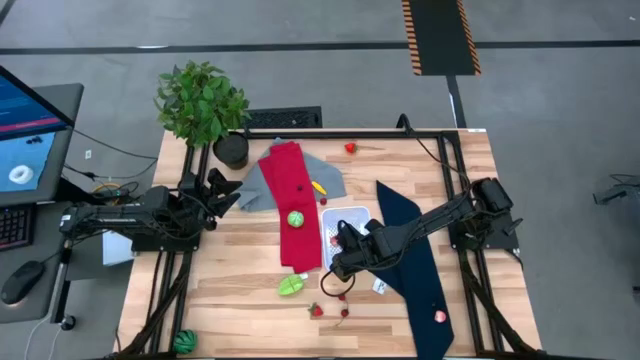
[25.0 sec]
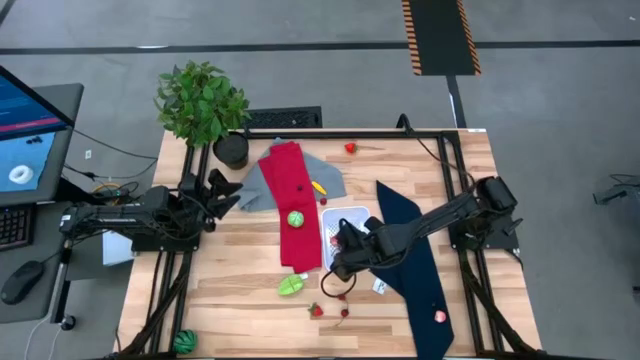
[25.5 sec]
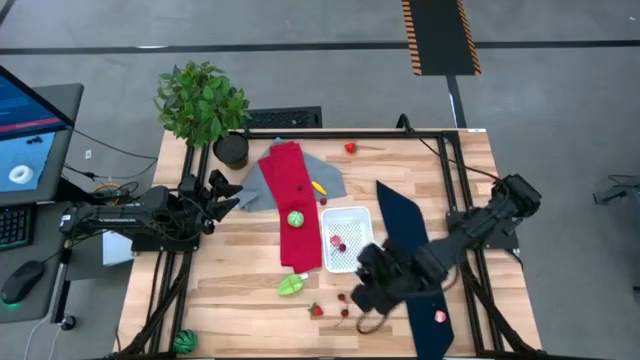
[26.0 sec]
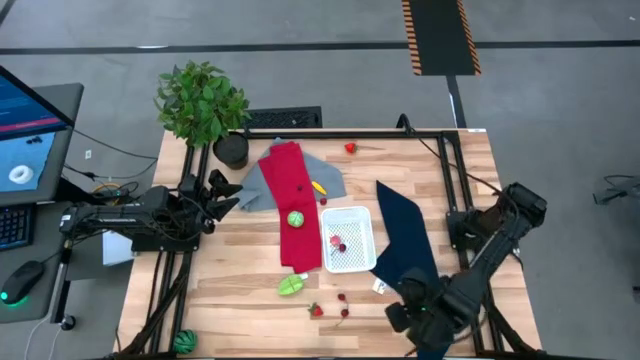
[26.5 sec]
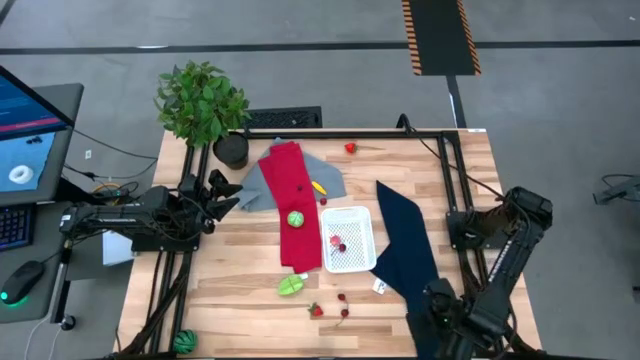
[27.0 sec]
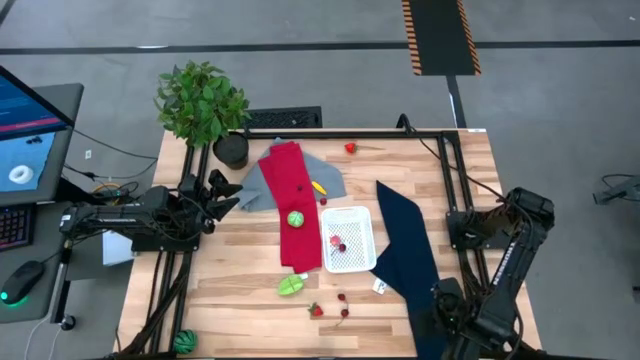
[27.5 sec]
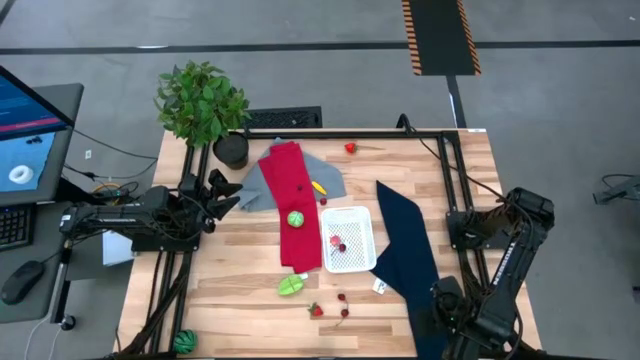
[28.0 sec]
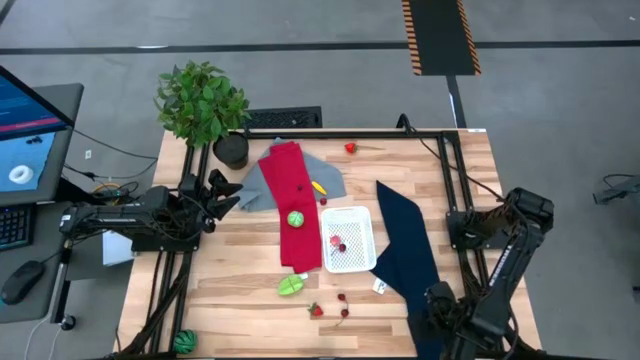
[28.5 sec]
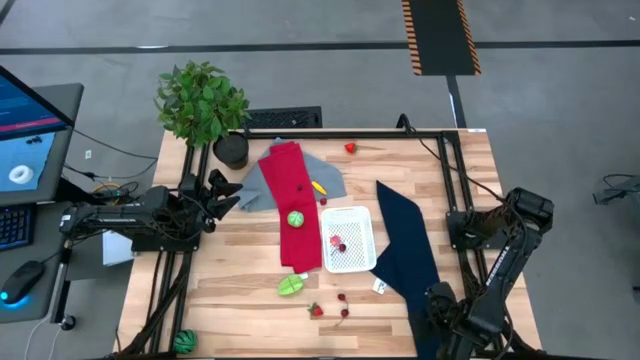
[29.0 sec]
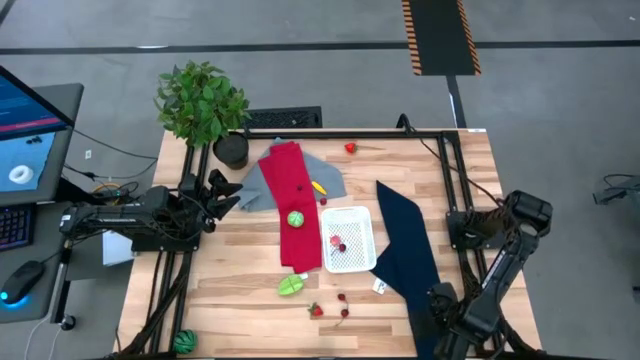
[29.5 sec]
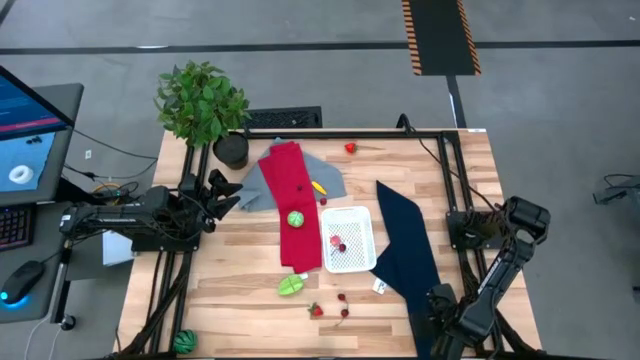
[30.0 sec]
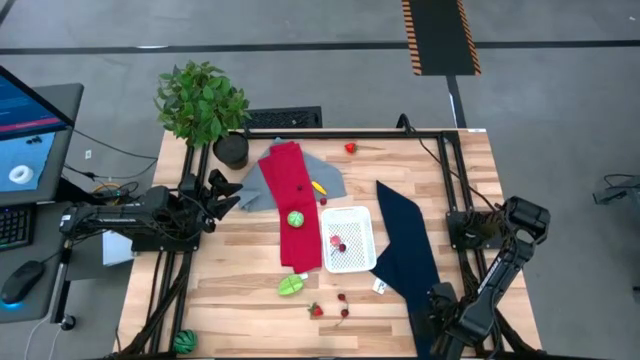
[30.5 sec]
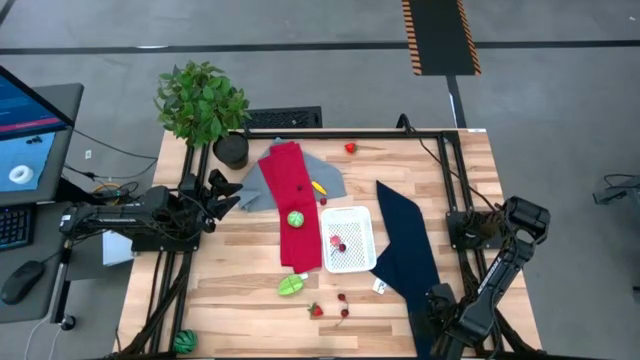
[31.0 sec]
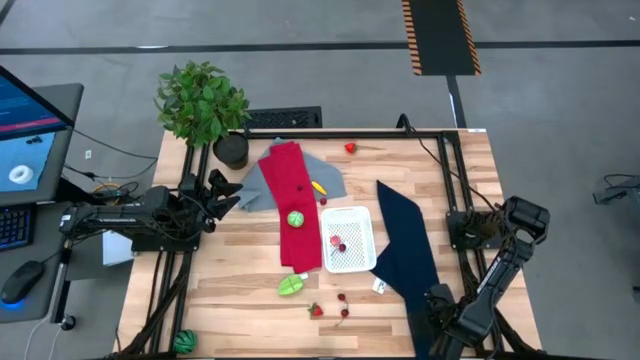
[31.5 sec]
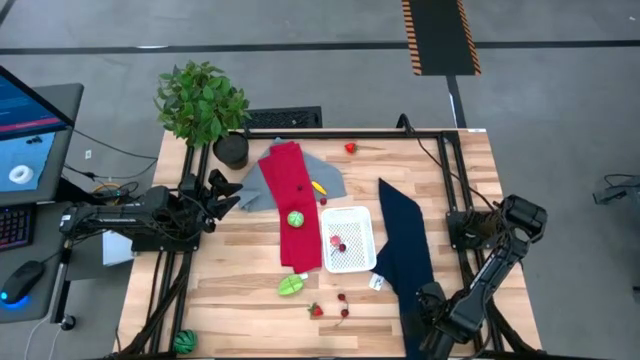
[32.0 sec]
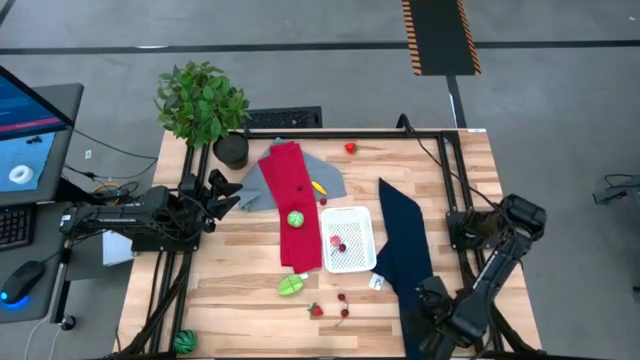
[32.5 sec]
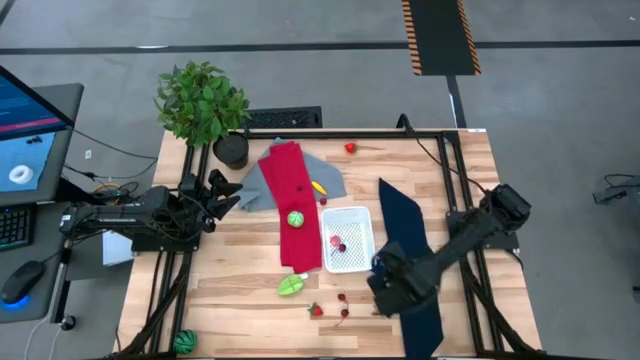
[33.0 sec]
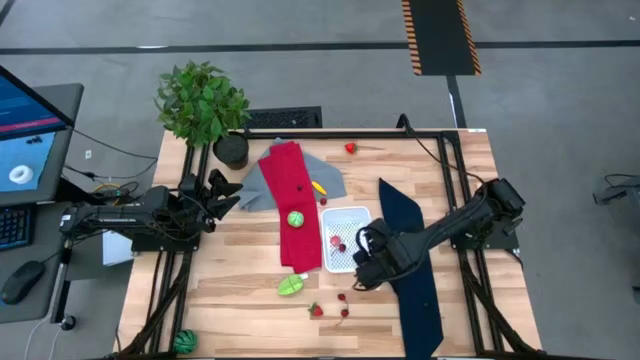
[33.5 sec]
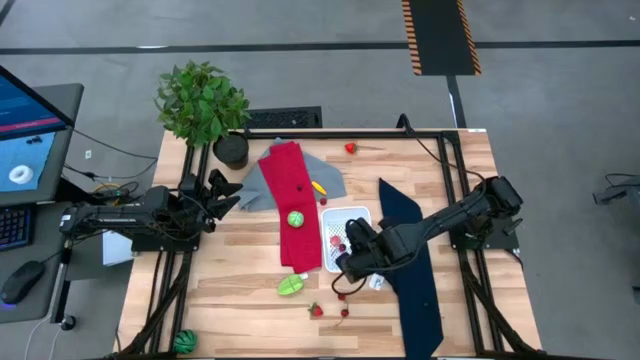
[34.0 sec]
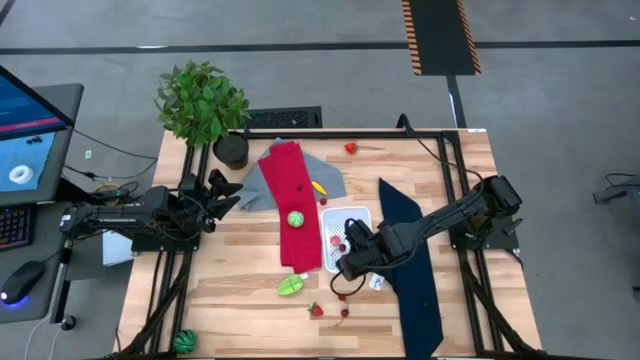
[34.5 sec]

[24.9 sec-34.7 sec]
Task: Pick and placing Produce into tupperware
Put the peach into the white bin

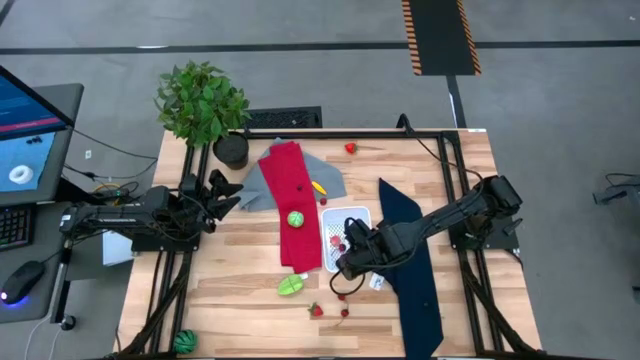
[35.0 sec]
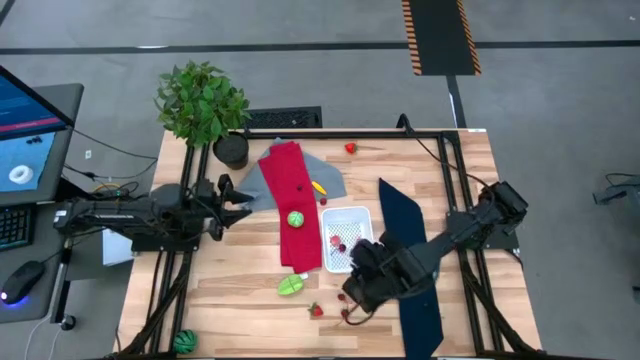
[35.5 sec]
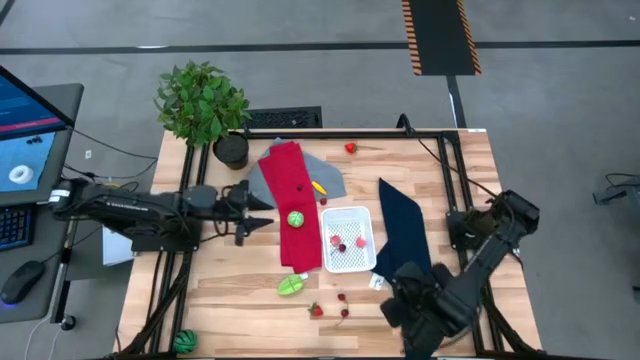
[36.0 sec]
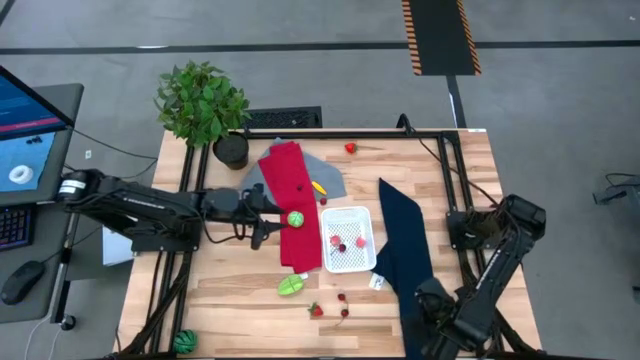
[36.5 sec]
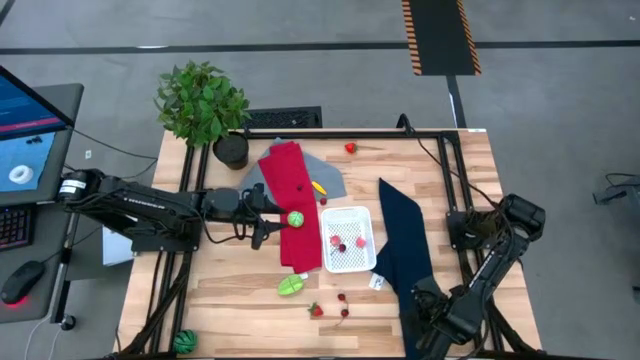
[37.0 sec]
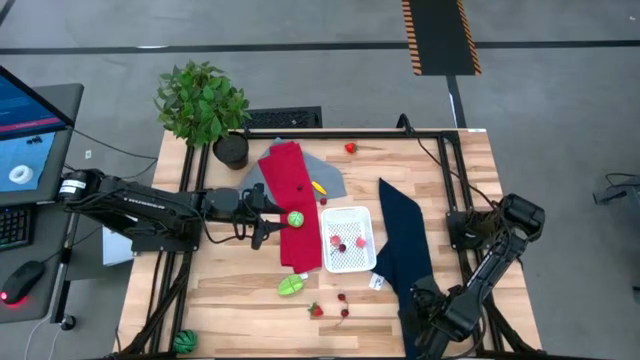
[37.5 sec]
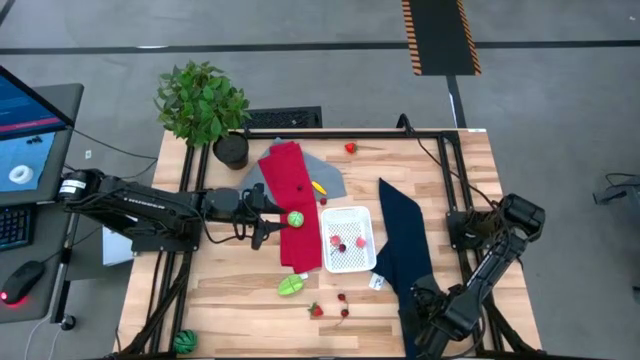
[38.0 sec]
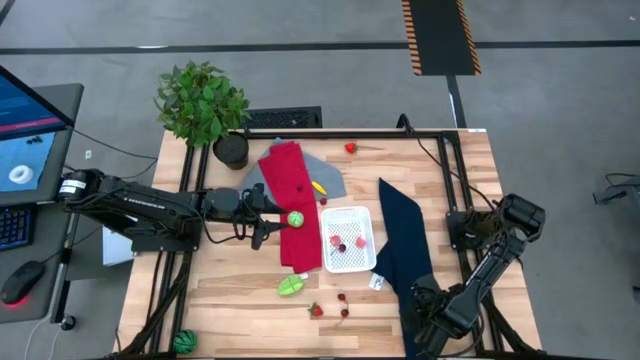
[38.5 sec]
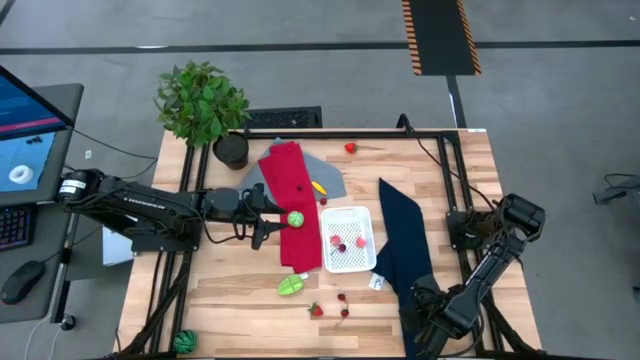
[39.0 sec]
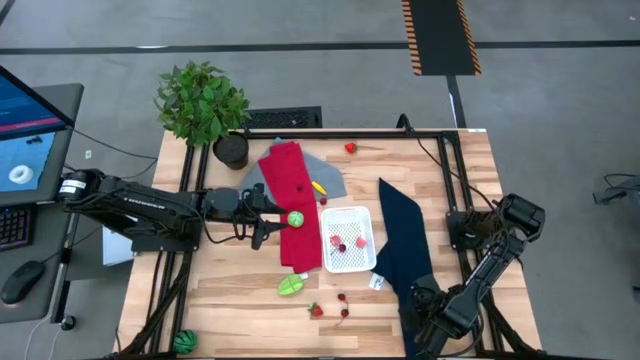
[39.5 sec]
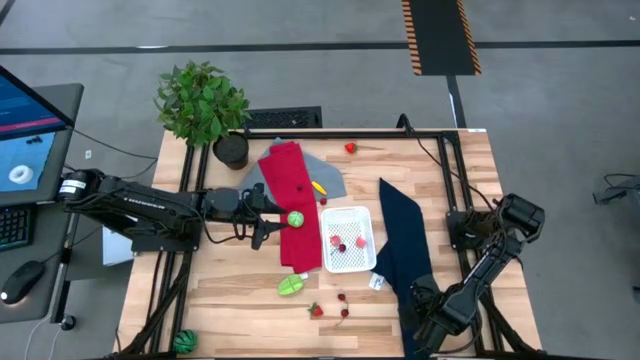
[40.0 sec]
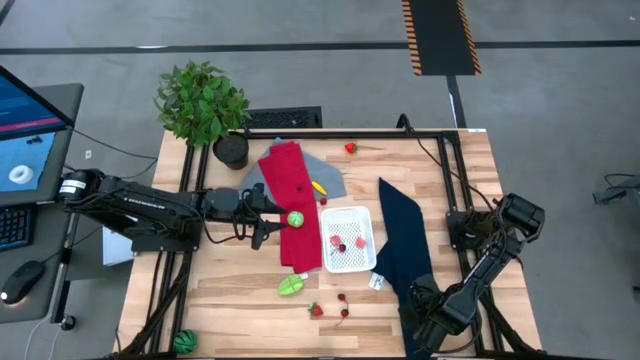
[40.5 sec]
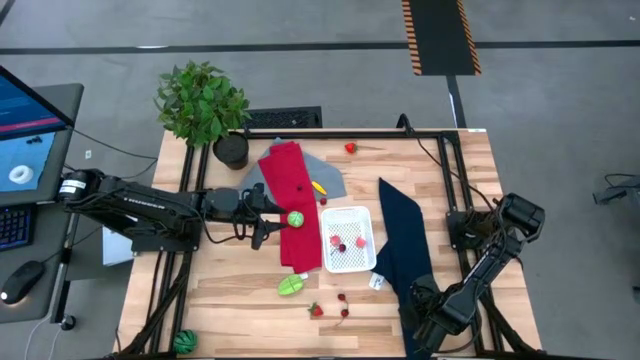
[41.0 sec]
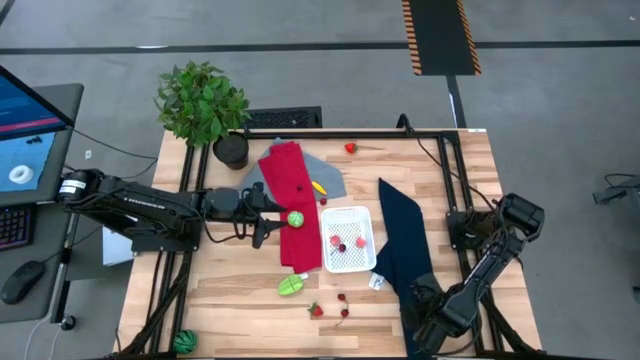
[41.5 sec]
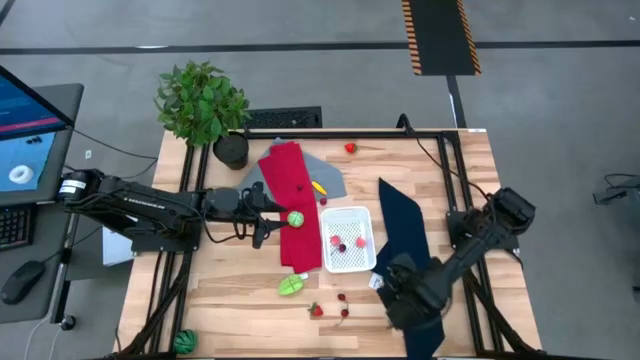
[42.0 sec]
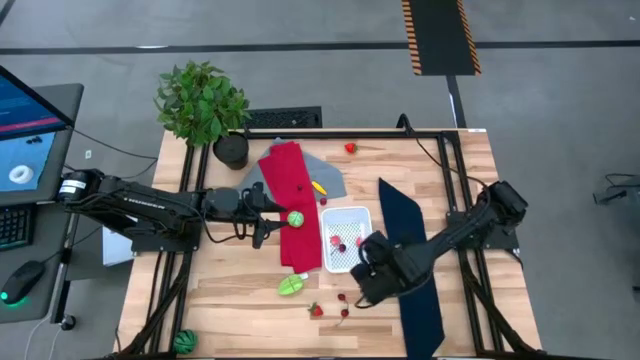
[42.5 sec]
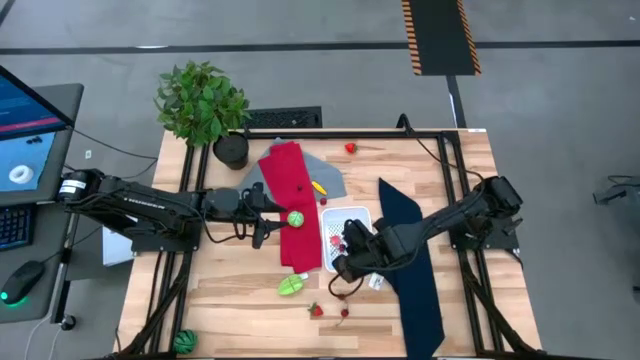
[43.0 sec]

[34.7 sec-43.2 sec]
Put the blueberry into the white bin

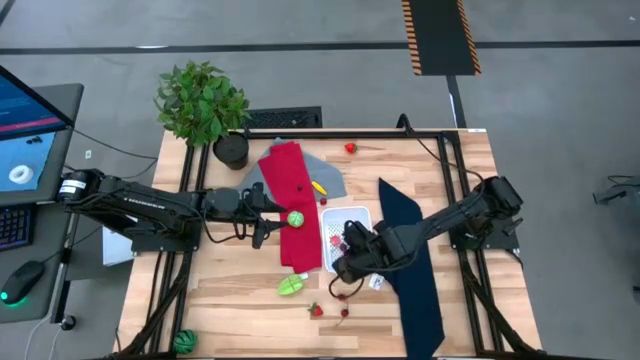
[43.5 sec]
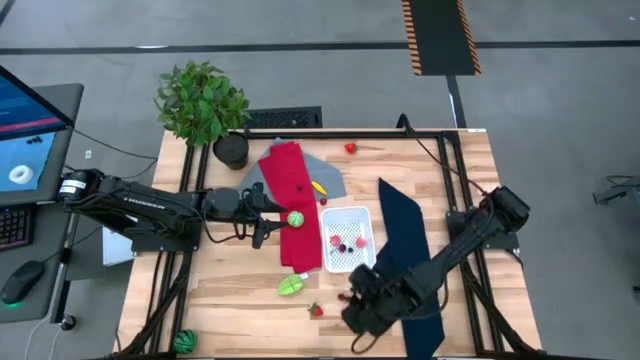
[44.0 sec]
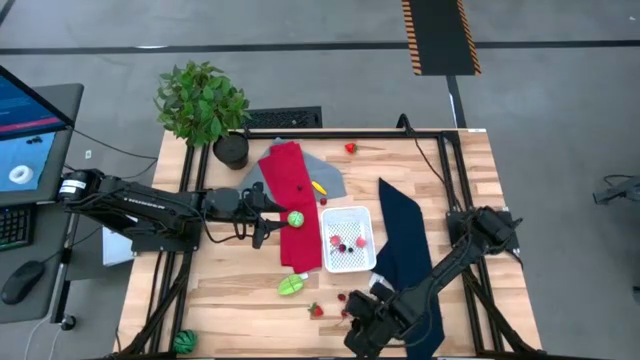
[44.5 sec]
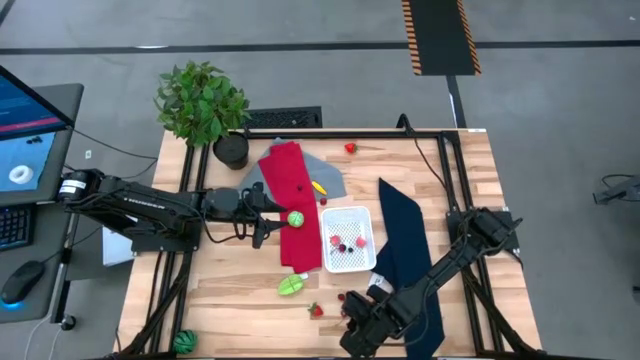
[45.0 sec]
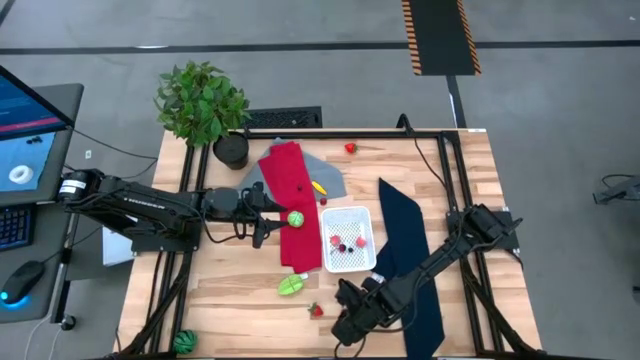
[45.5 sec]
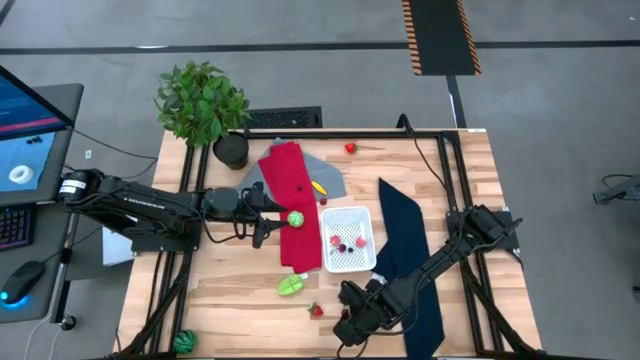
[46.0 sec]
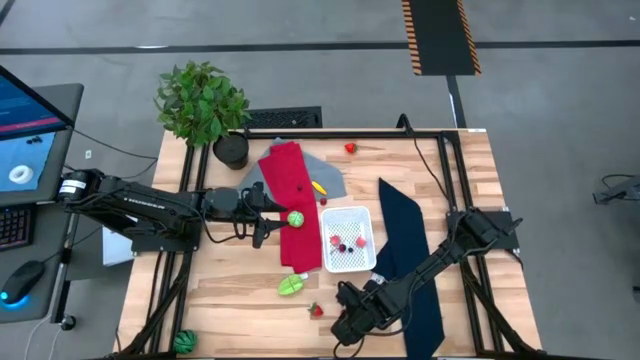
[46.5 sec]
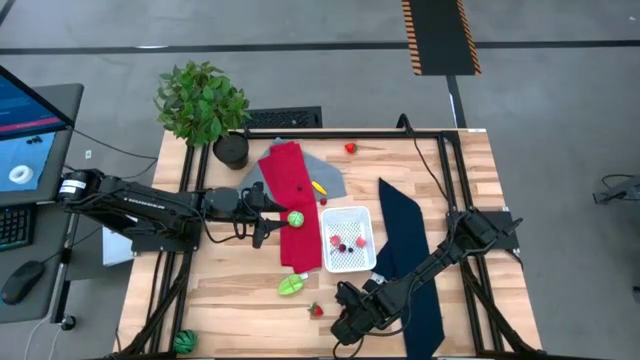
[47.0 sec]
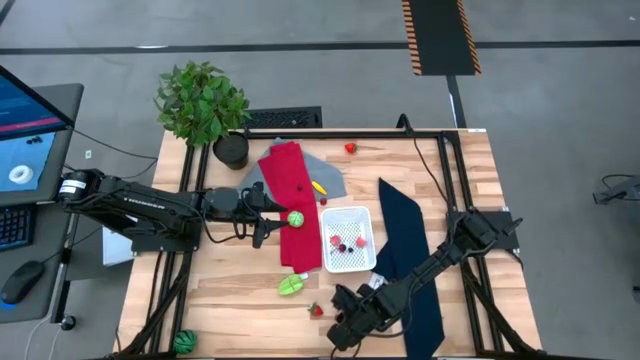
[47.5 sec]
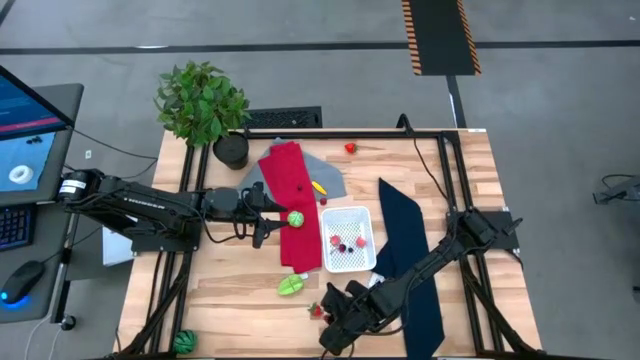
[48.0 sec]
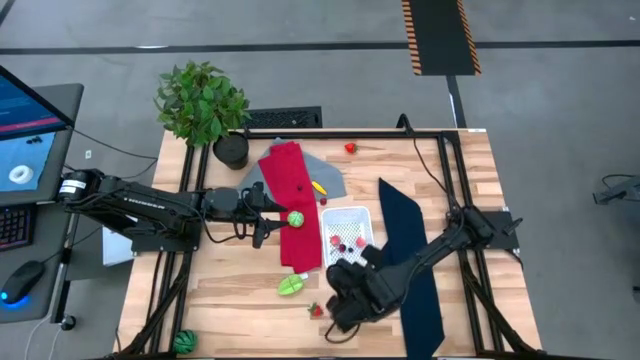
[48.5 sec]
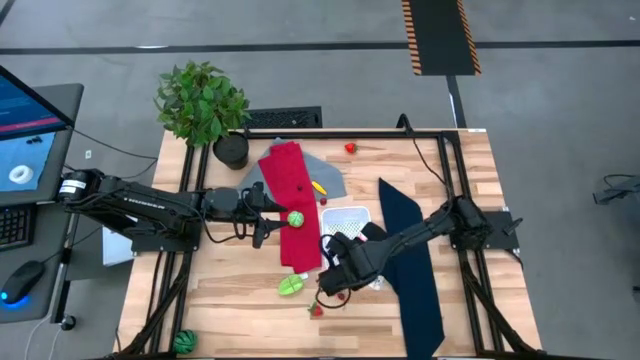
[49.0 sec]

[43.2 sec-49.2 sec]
Put the cherry into the white bin
